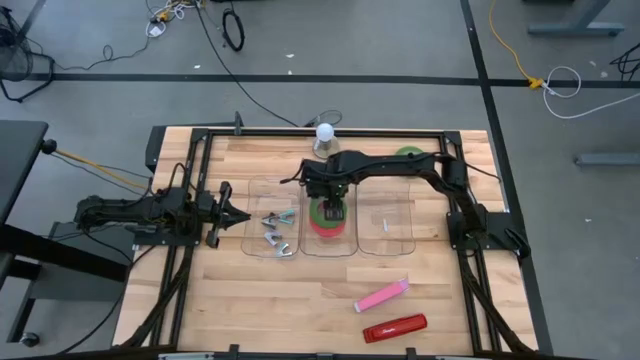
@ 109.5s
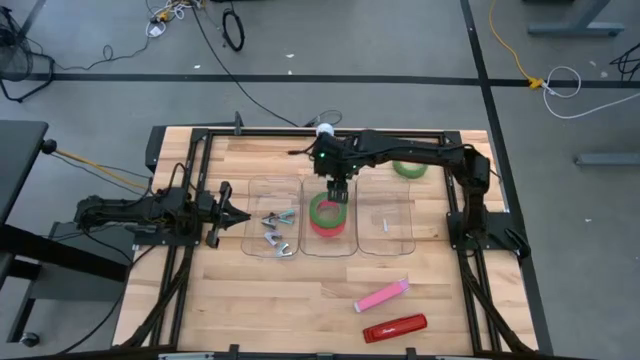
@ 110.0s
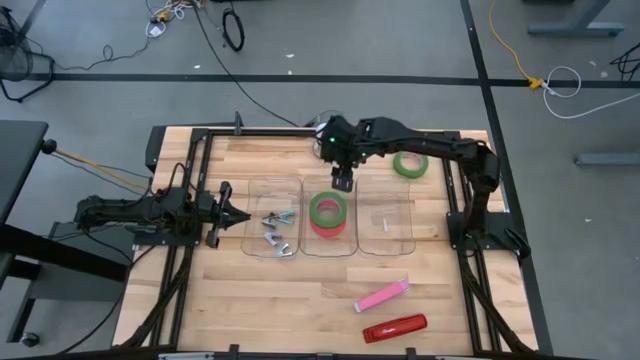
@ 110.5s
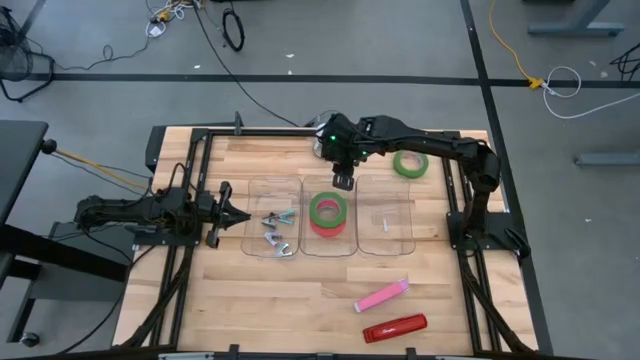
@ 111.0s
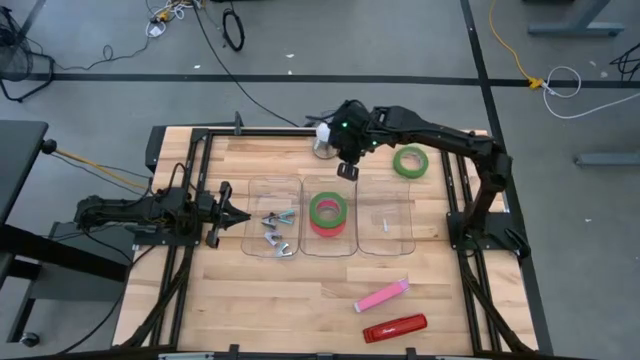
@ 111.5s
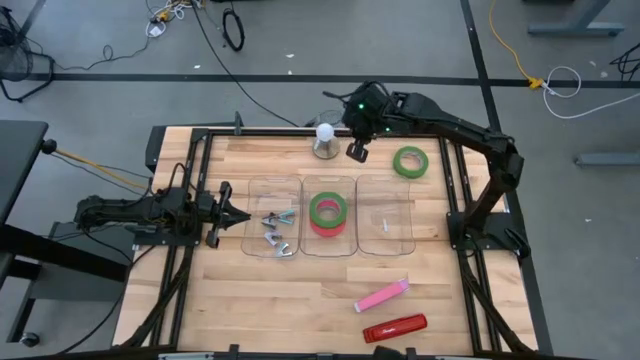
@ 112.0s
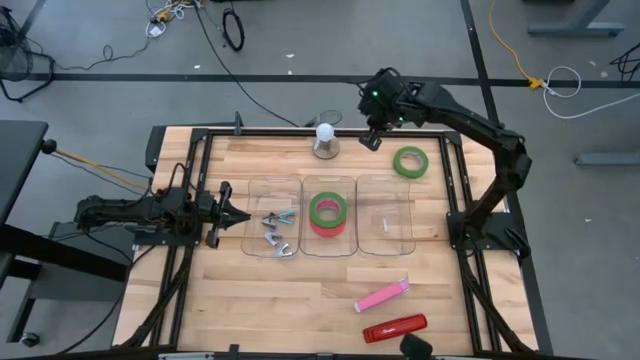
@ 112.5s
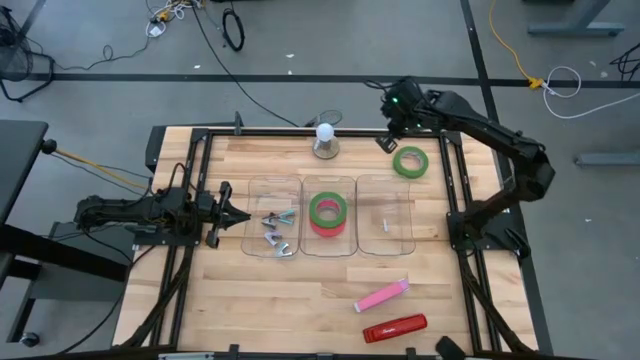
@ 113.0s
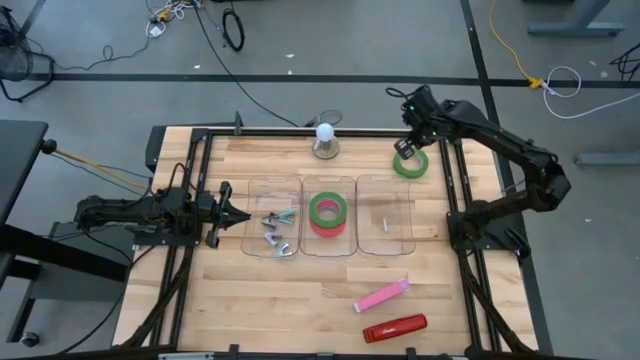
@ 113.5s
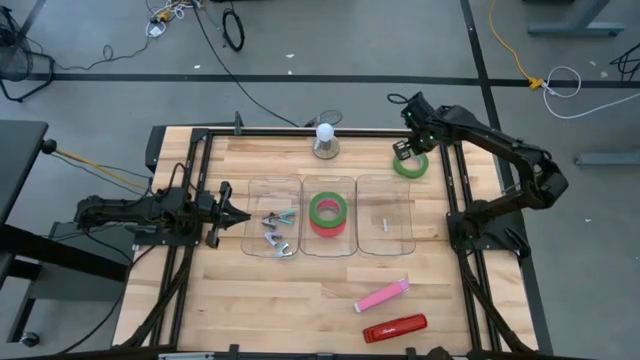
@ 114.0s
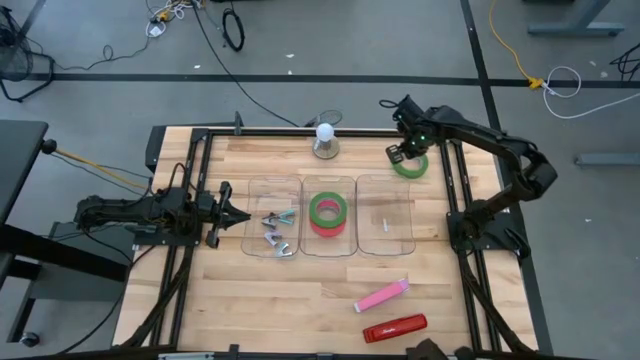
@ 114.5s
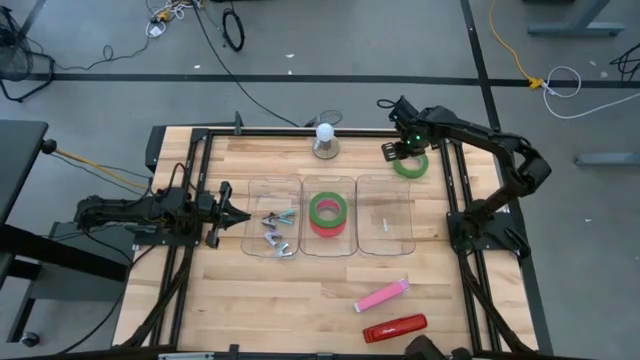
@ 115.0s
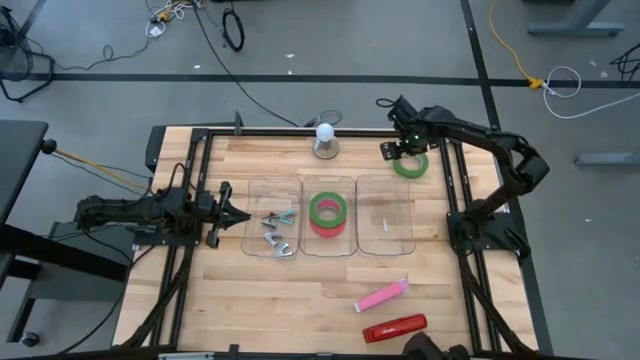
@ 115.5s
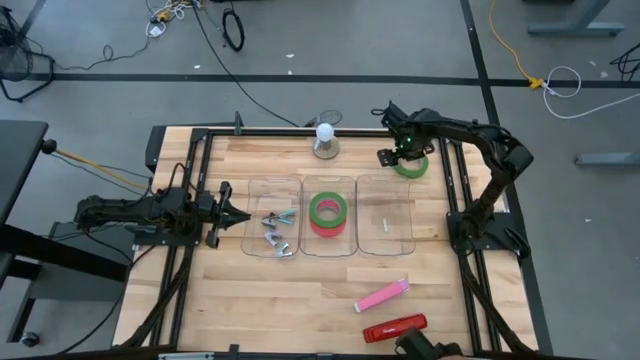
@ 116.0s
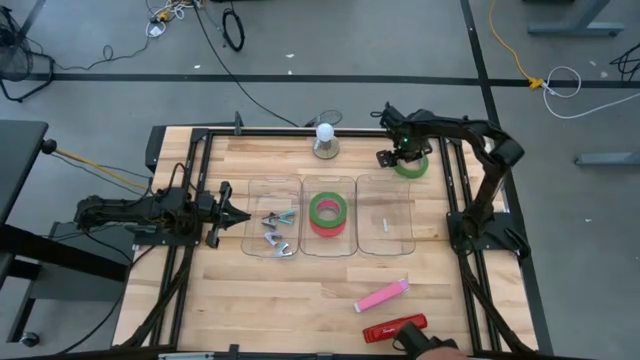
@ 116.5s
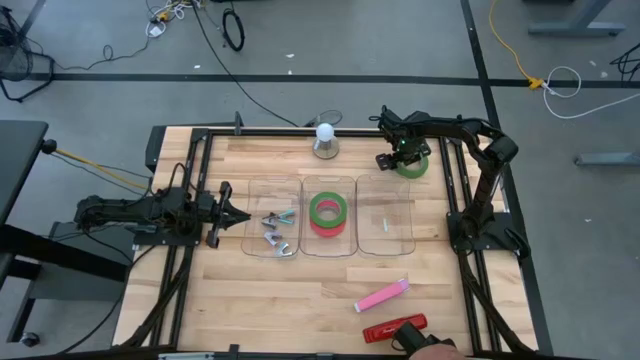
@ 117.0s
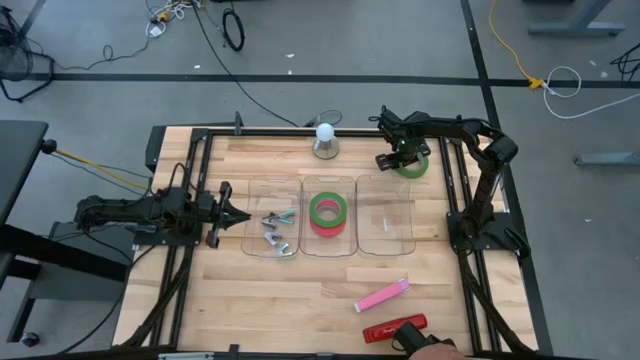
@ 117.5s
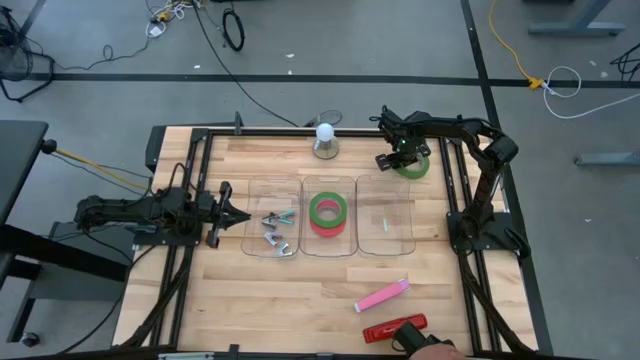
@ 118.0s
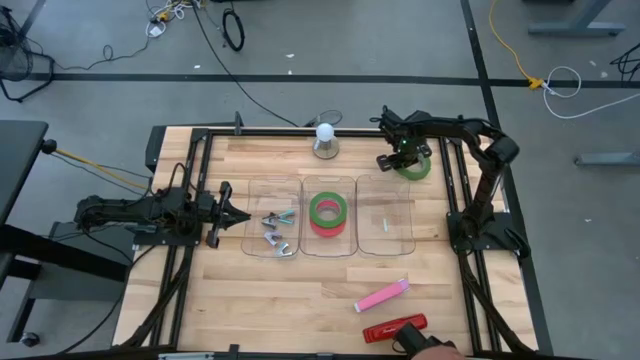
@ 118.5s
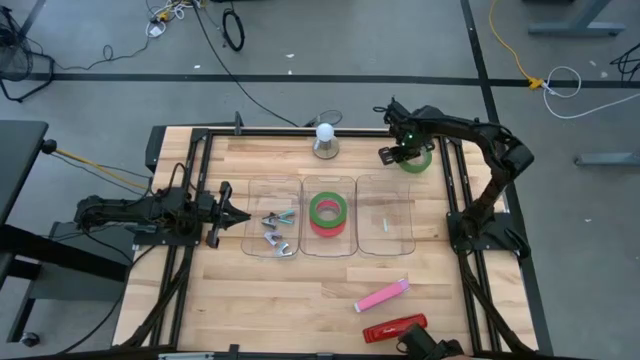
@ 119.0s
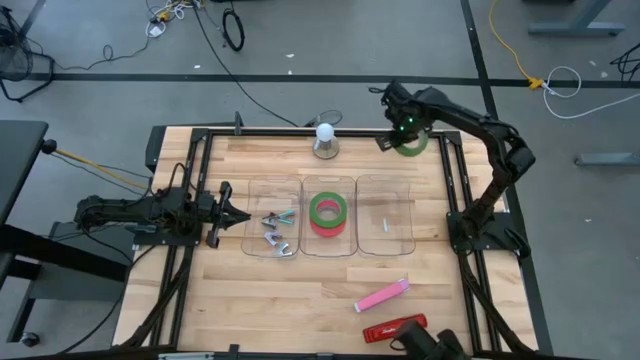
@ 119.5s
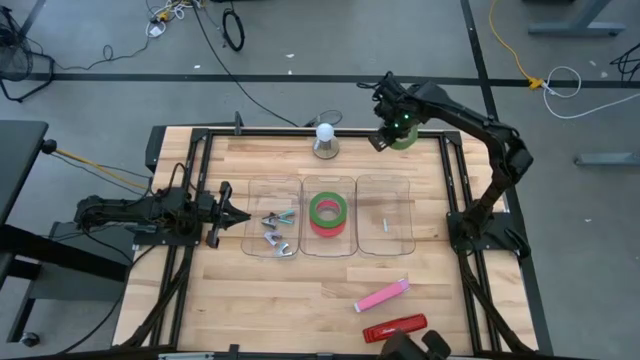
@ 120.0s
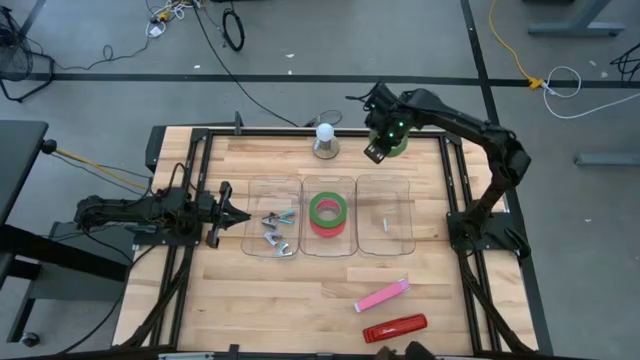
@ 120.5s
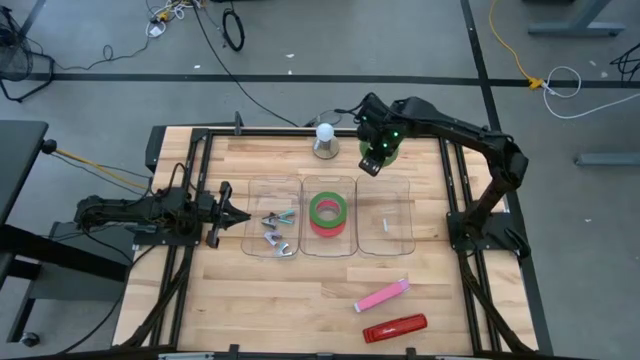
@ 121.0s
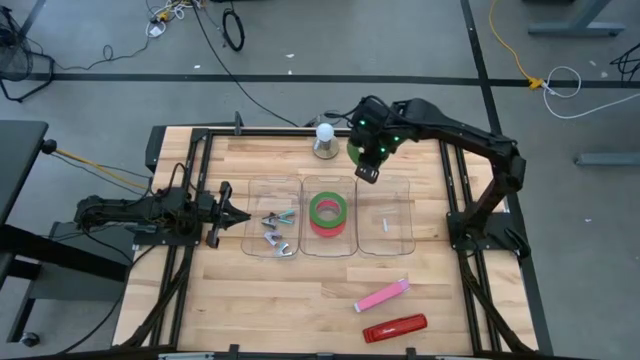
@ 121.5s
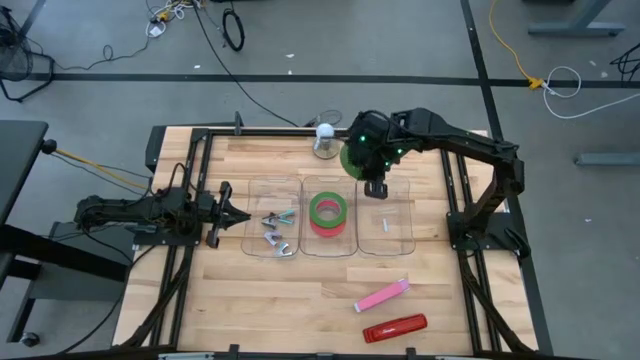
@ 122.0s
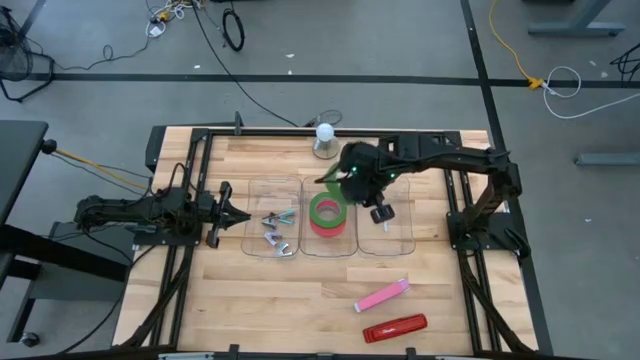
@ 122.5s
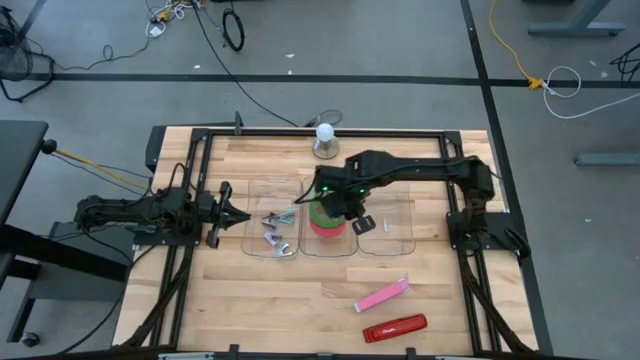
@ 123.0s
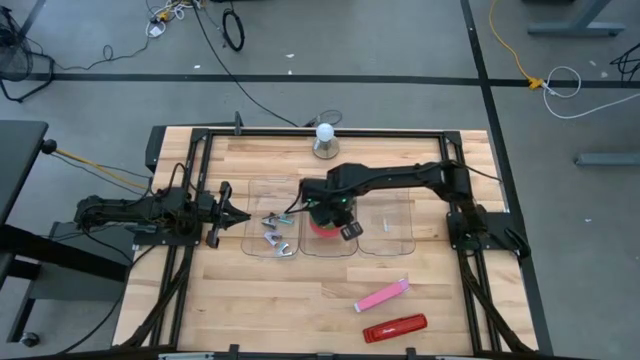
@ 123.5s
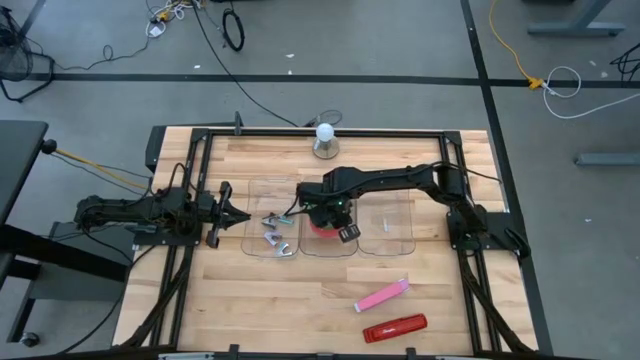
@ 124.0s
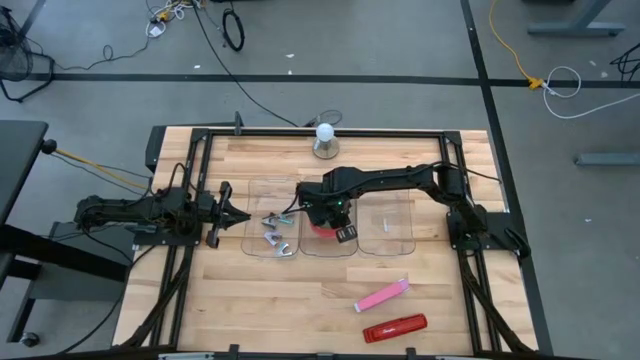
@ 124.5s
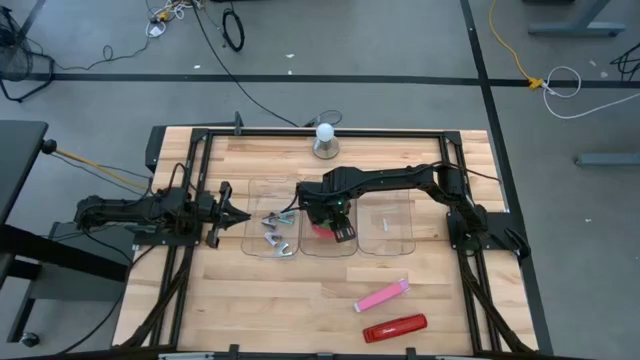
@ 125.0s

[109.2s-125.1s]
Task: Pick and place Stapler, Stapler remover, tape
Put the green tape into the middle transparent bin

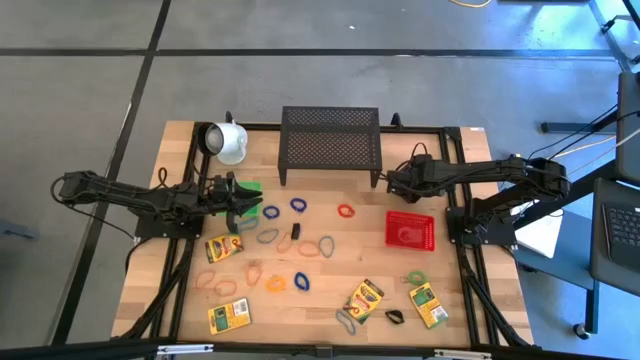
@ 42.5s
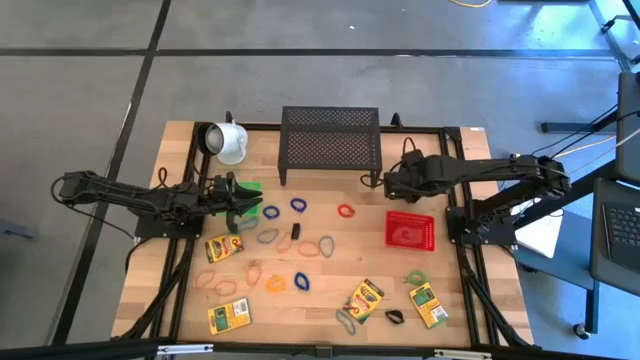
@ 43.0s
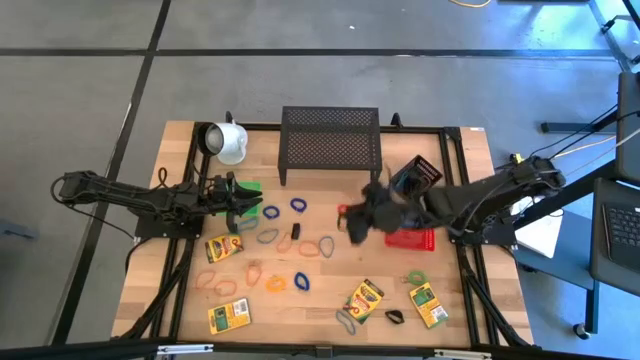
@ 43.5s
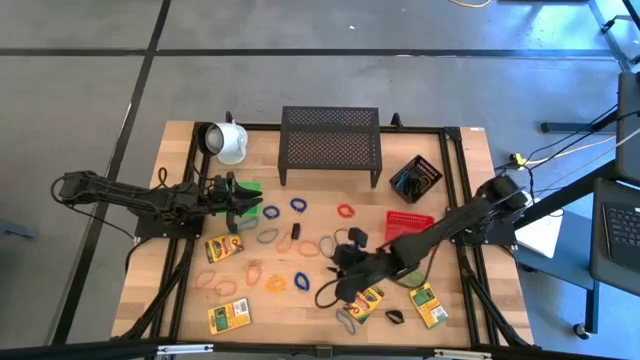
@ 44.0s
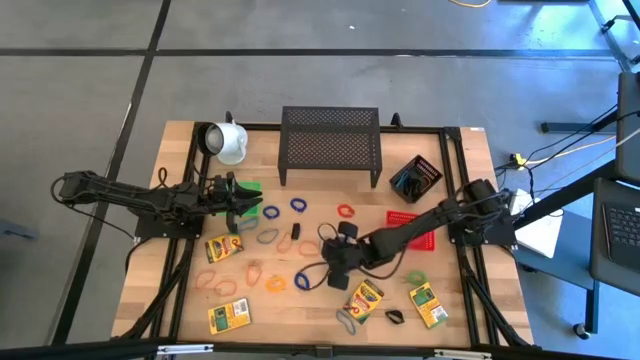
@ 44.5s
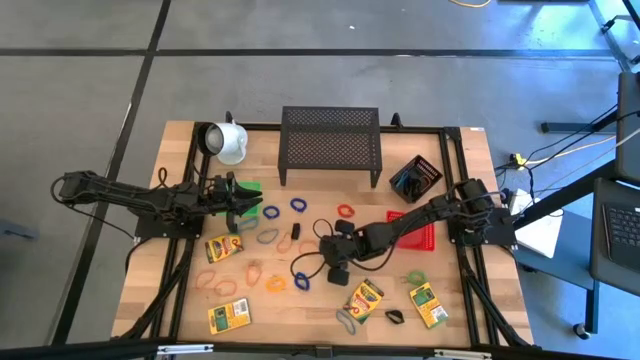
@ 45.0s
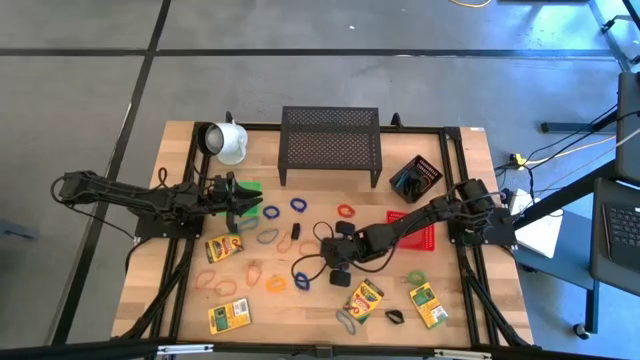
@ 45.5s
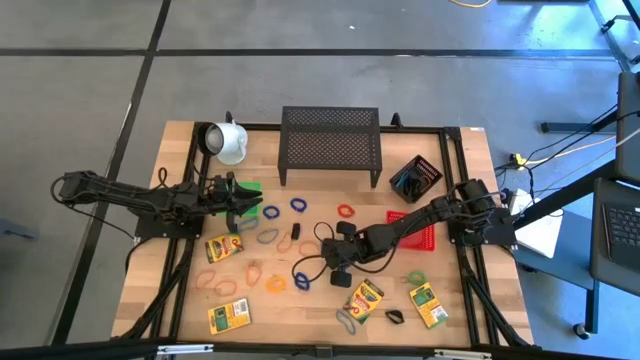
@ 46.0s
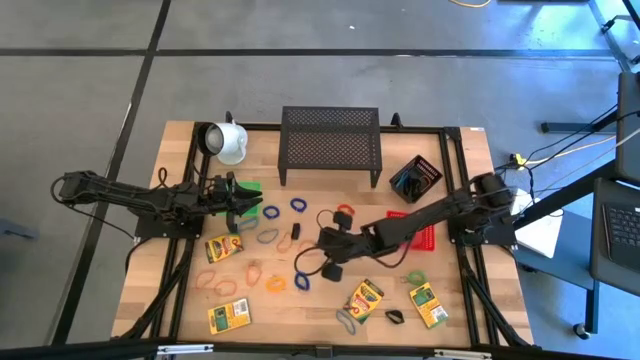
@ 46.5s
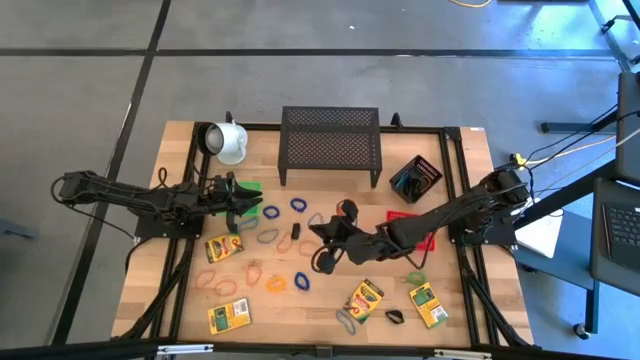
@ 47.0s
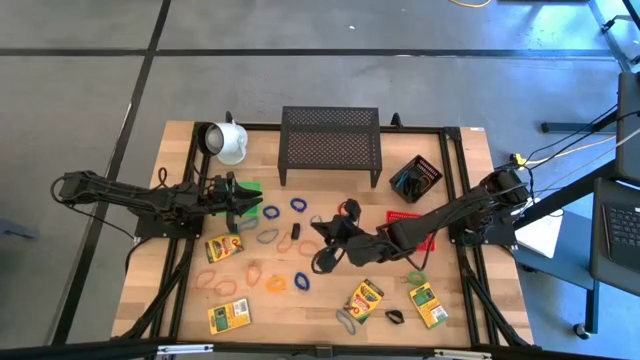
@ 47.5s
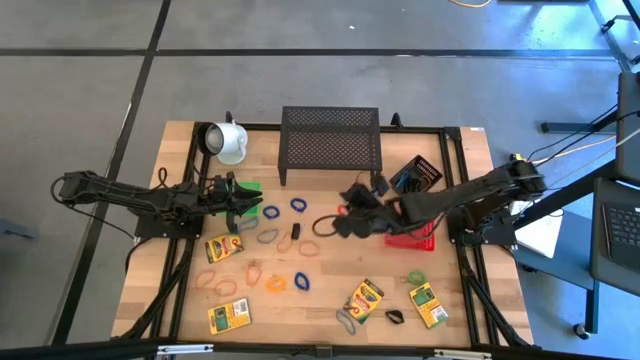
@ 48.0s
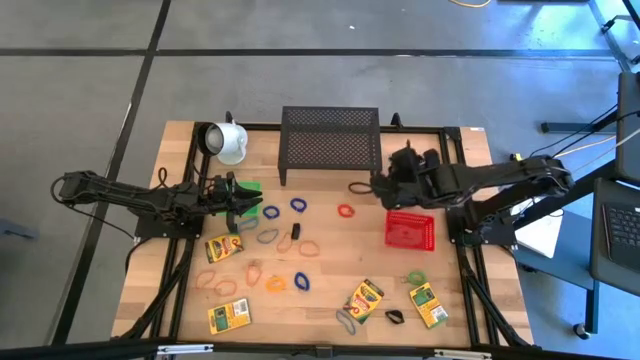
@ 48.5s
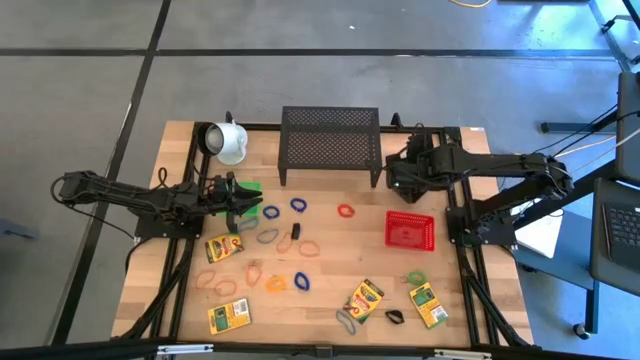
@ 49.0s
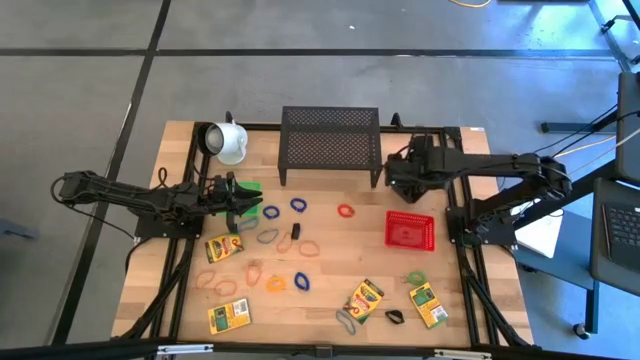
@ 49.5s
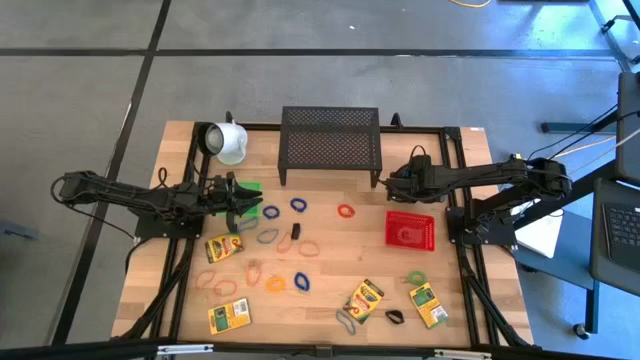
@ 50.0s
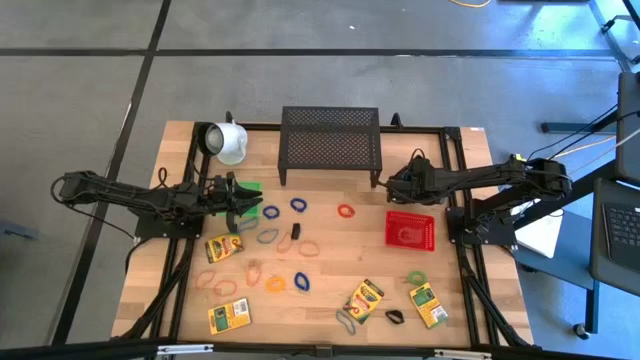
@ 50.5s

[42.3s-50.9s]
Task: Pick & Place Office Desk Supplies
Put the blue rubber band into the black bin
